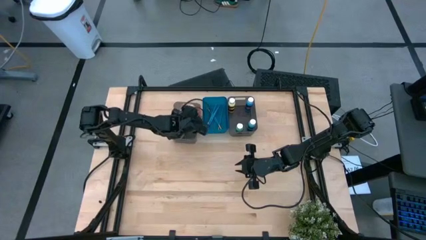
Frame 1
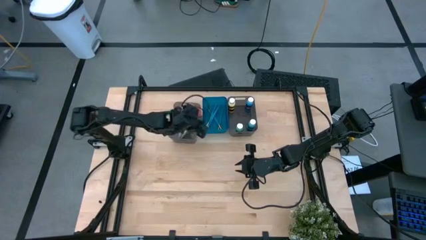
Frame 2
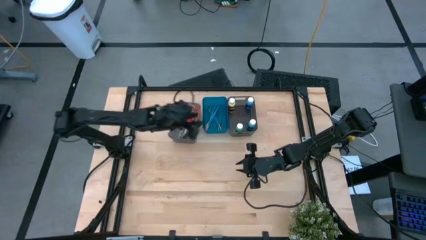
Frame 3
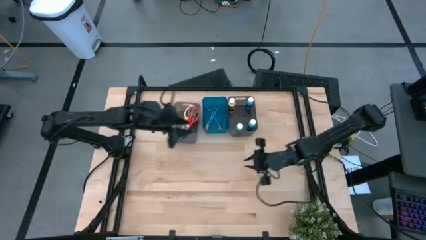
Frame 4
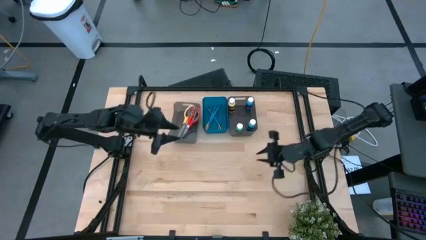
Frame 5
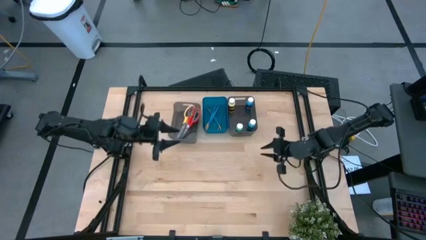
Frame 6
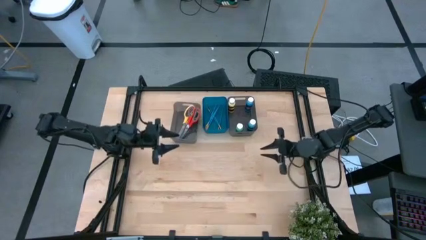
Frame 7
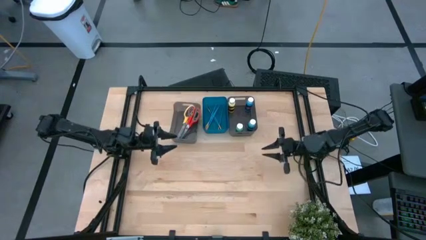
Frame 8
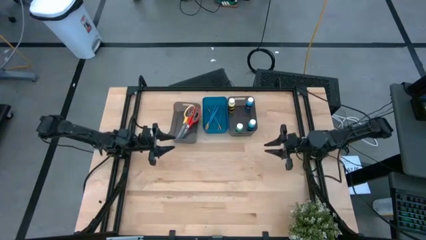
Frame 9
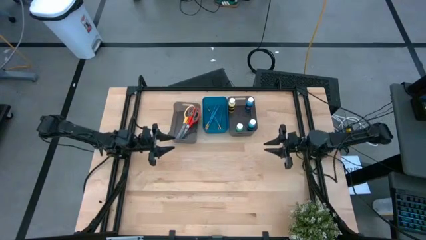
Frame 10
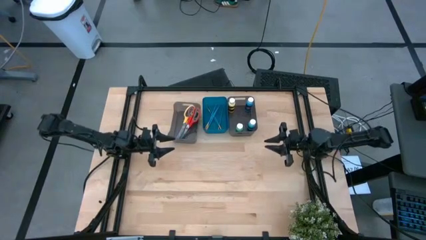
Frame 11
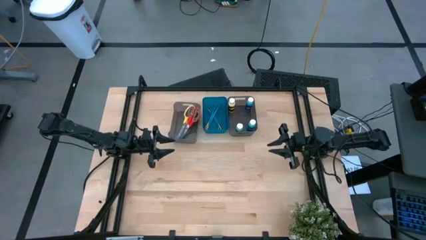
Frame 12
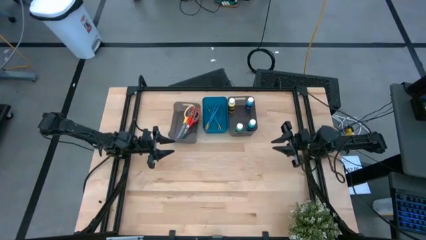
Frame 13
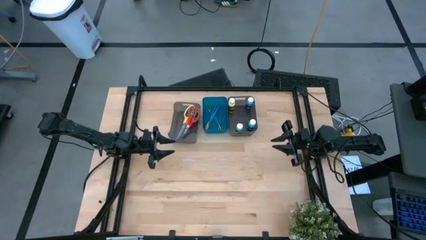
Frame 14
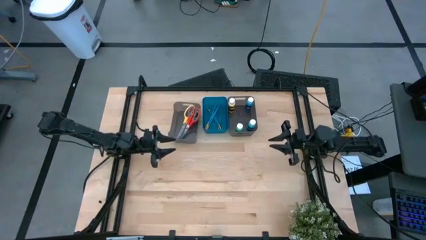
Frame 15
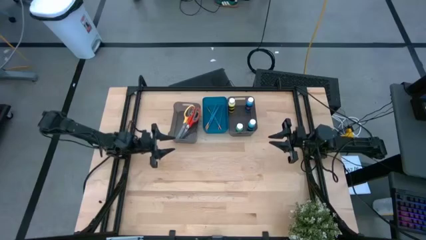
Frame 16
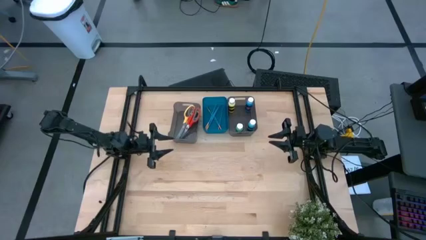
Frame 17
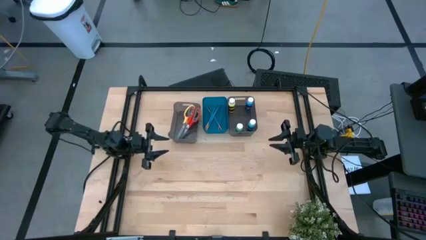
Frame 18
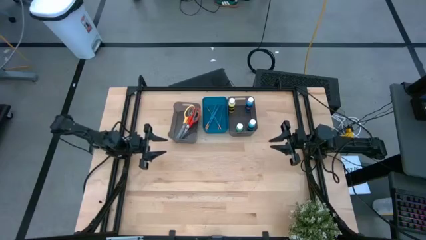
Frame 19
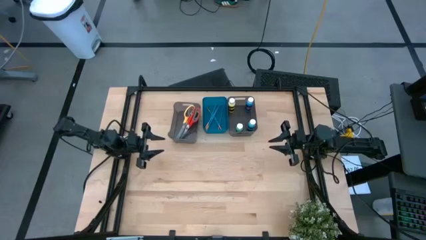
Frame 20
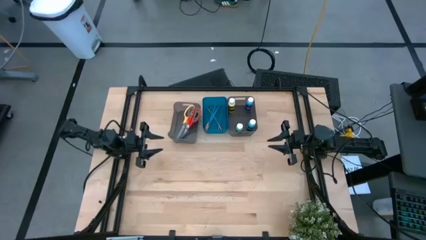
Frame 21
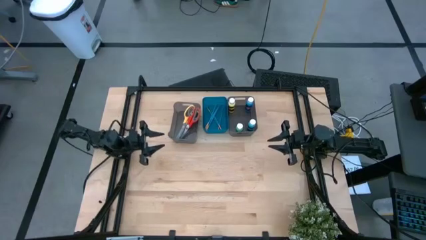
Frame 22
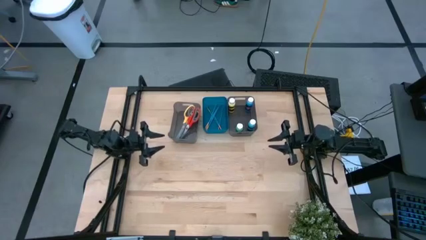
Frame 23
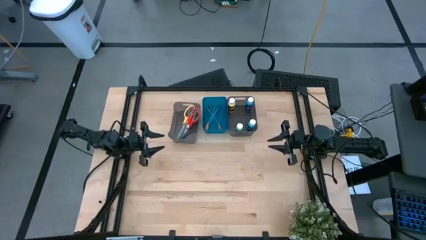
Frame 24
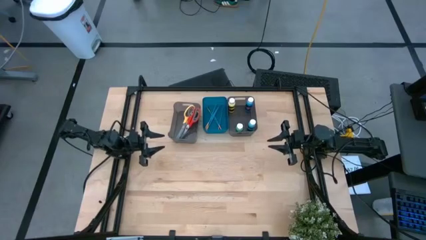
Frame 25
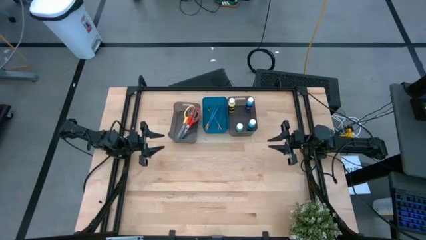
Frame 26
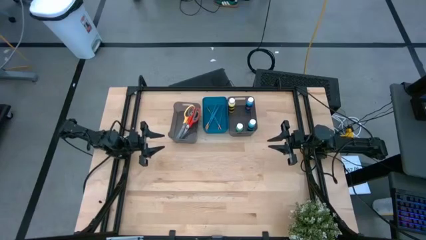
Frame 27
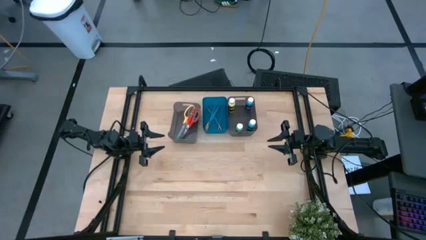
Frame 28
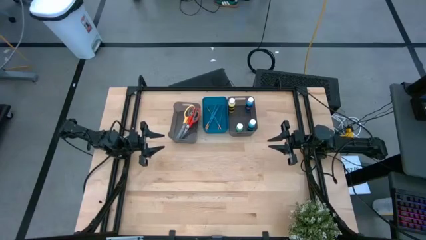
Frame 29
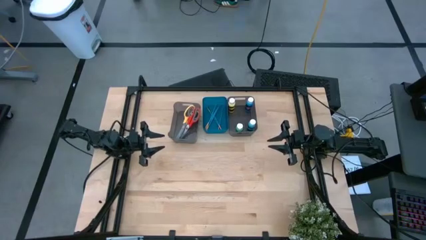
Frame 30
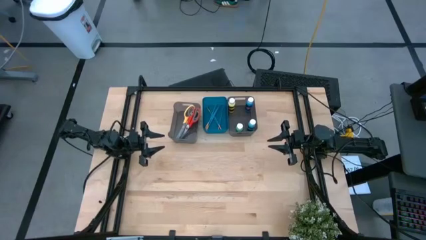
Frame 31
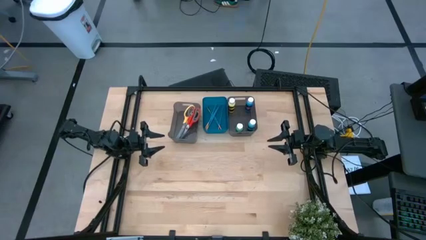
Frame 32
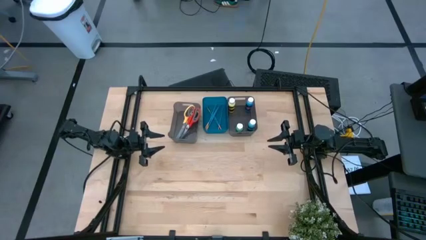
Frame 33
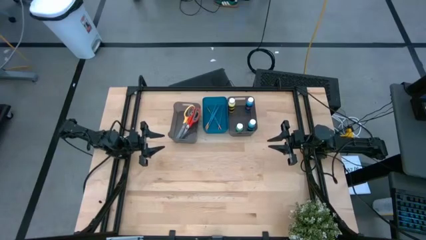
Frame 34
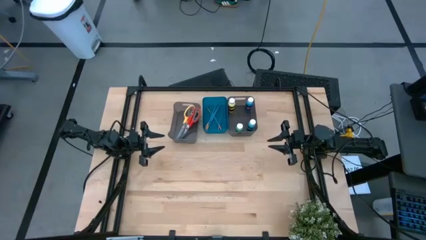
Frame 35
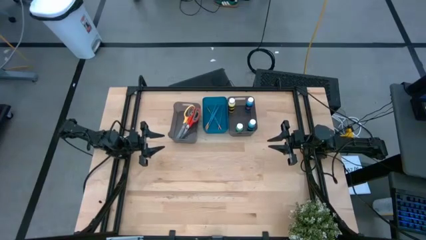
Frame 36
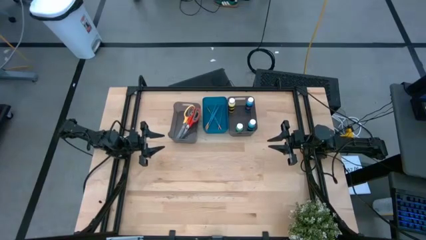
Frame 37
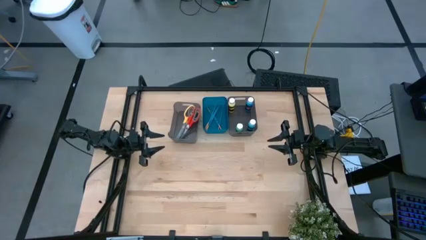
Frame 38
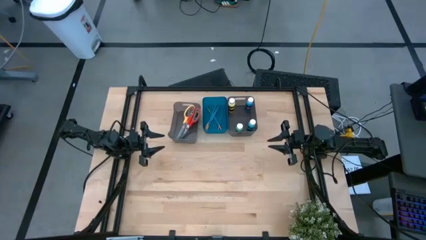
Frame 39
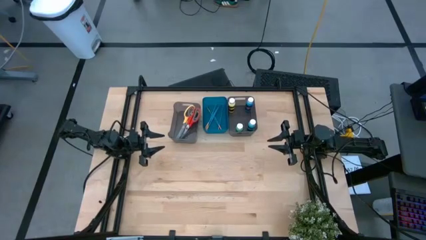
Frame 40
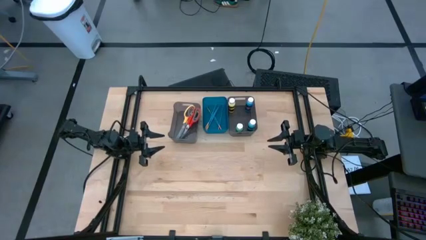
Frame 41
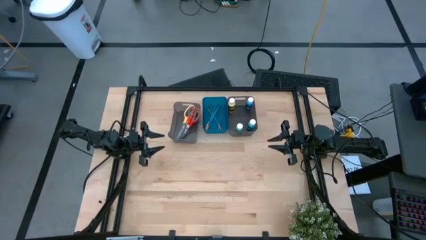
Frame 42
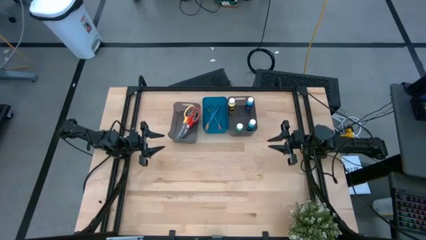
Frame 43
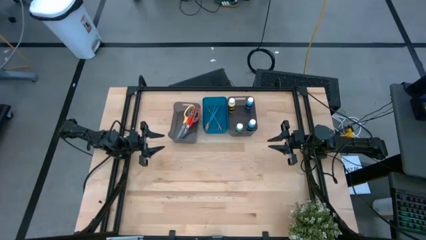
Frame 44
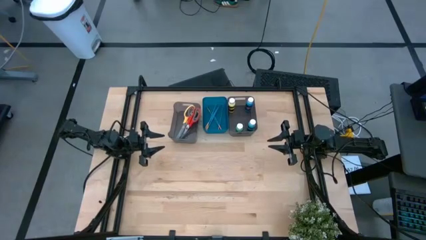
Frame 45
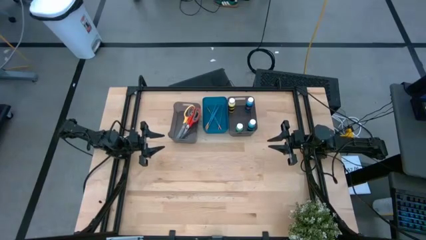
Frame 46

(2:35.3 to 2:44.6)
Task: Pick & Place Paint Supplies
Return to Home Position

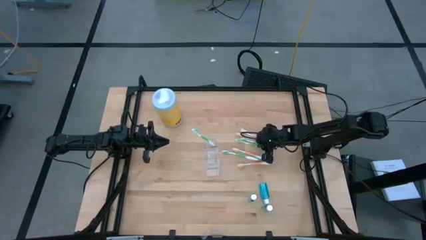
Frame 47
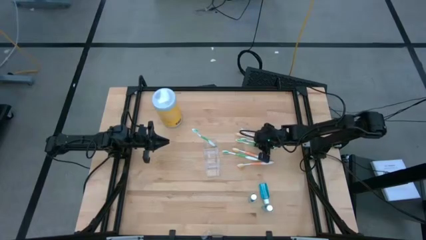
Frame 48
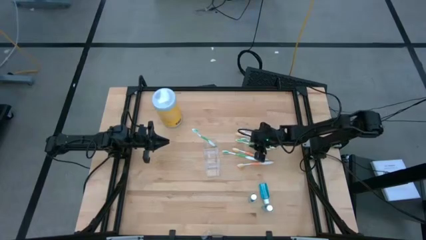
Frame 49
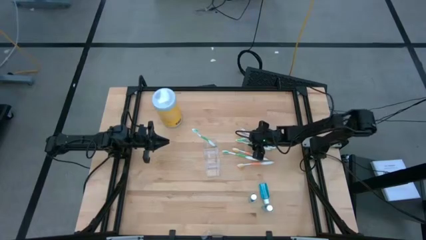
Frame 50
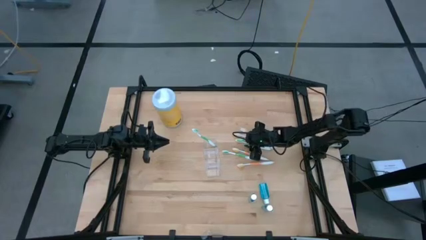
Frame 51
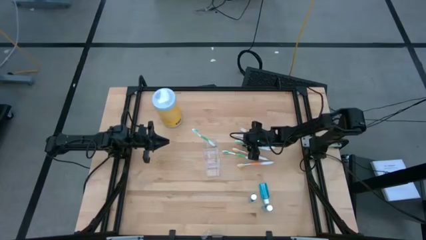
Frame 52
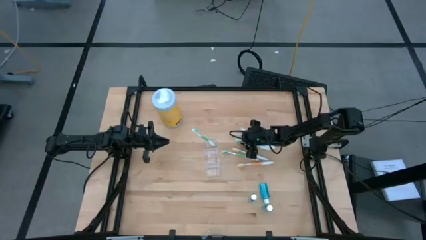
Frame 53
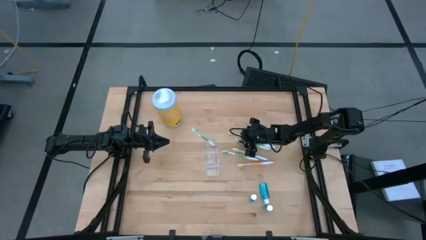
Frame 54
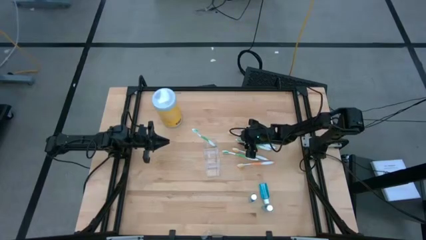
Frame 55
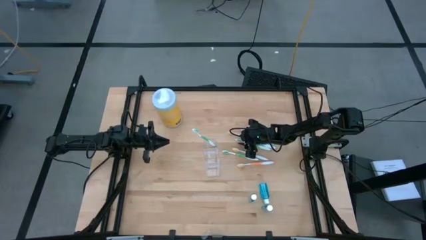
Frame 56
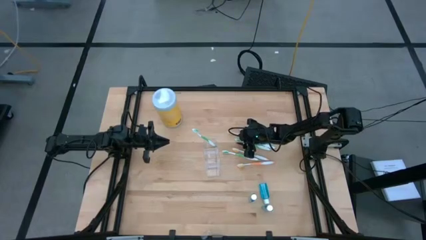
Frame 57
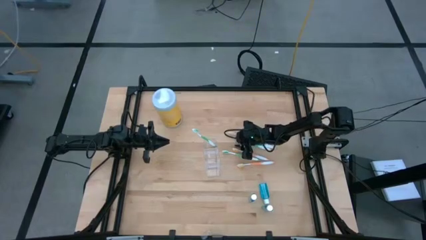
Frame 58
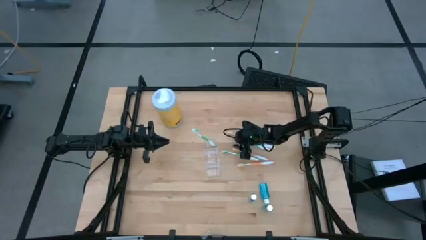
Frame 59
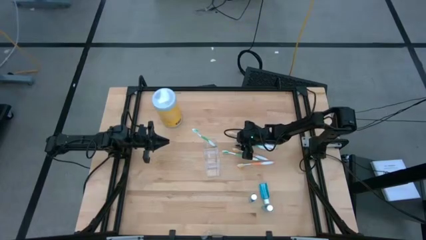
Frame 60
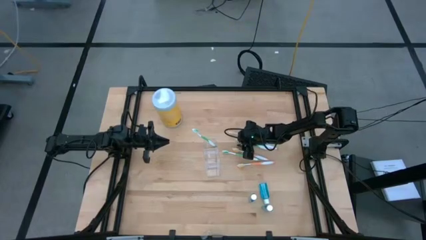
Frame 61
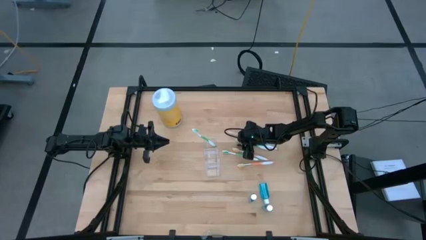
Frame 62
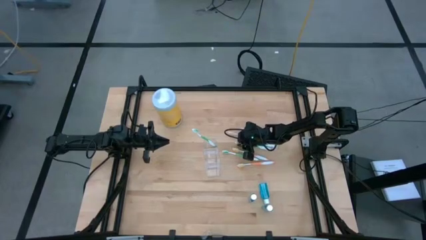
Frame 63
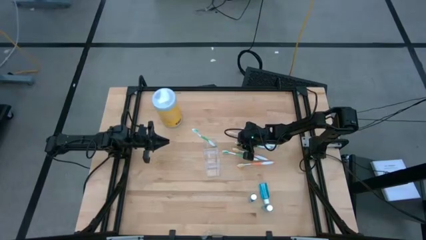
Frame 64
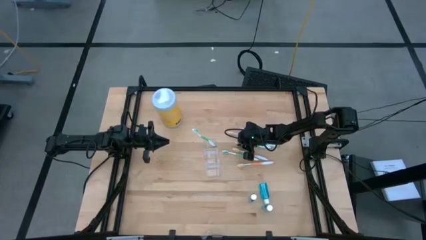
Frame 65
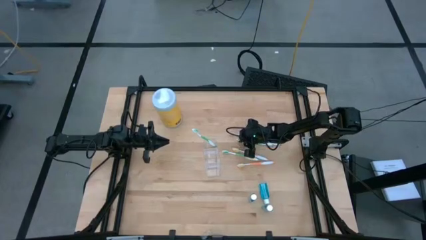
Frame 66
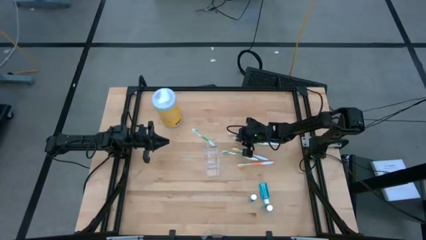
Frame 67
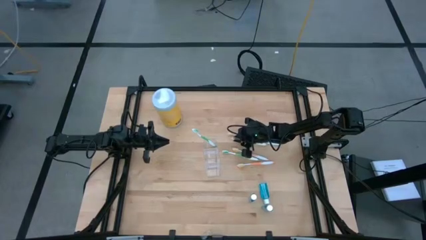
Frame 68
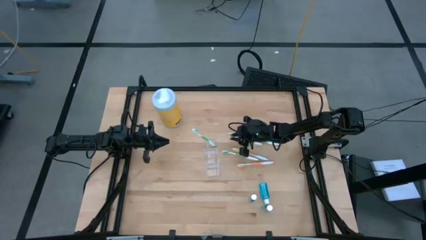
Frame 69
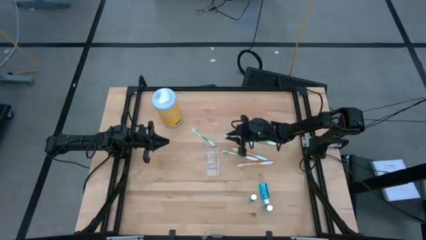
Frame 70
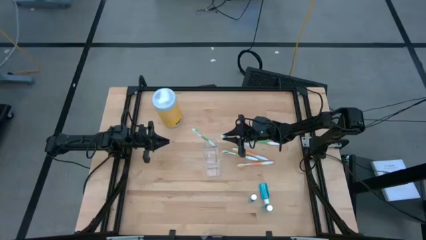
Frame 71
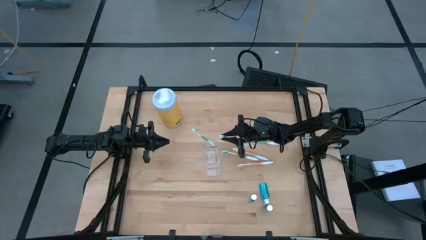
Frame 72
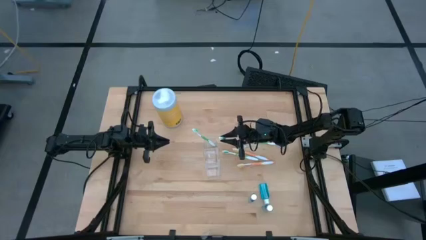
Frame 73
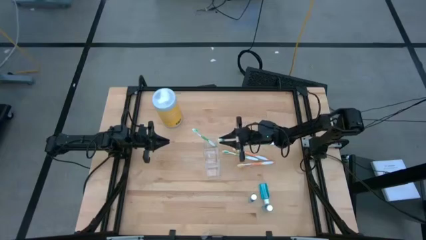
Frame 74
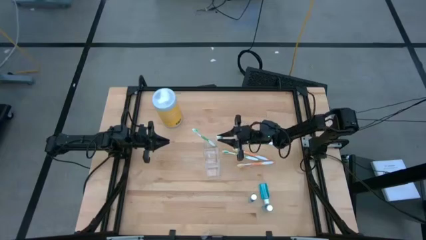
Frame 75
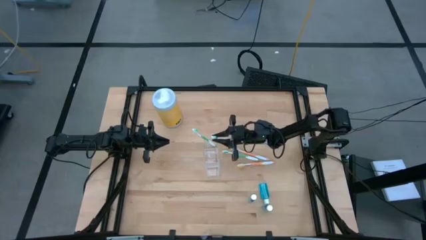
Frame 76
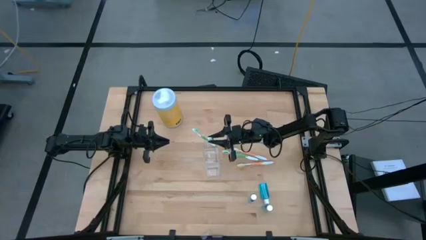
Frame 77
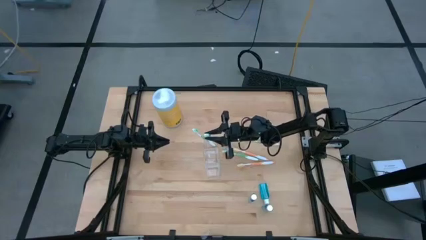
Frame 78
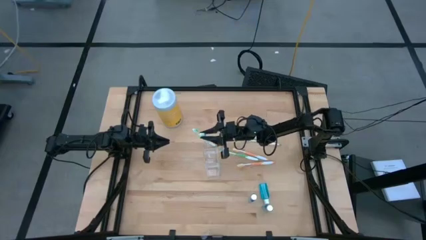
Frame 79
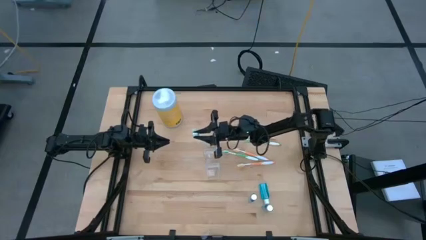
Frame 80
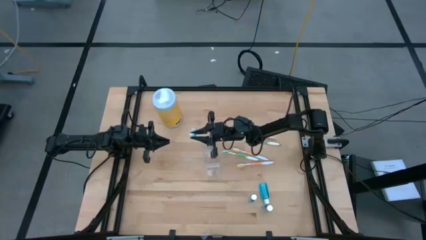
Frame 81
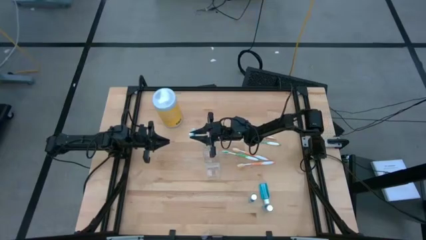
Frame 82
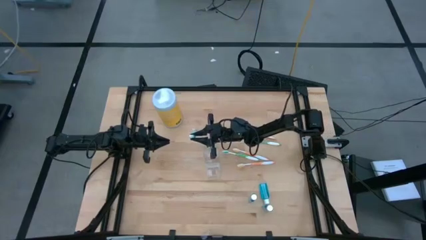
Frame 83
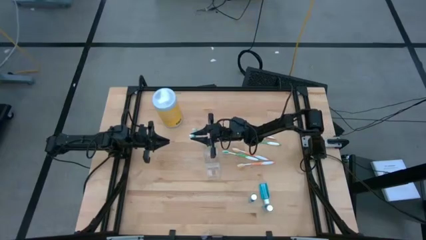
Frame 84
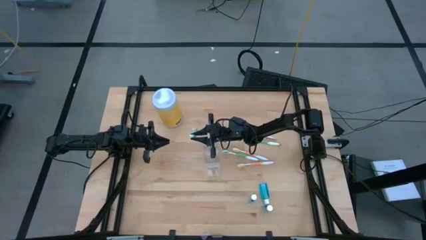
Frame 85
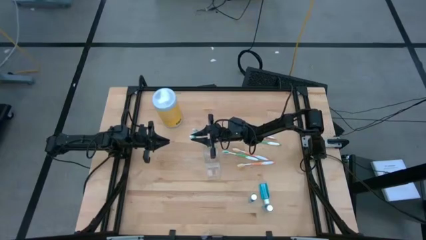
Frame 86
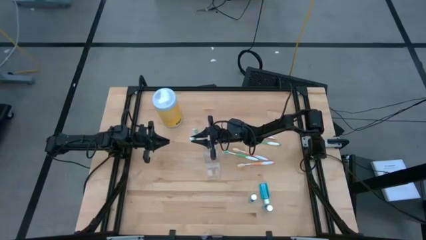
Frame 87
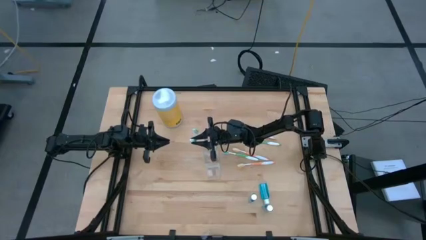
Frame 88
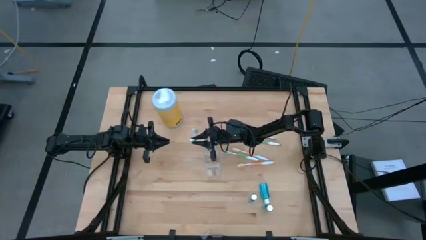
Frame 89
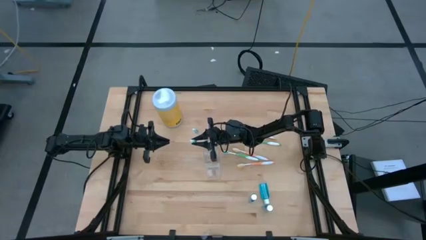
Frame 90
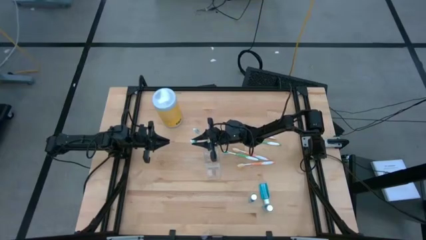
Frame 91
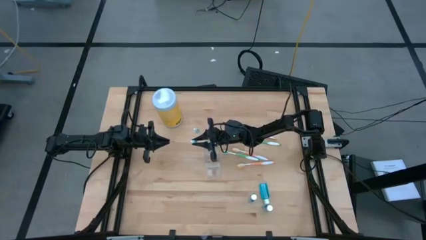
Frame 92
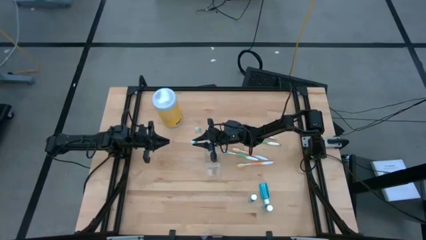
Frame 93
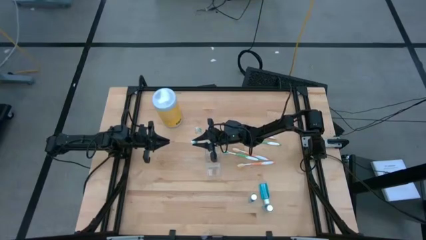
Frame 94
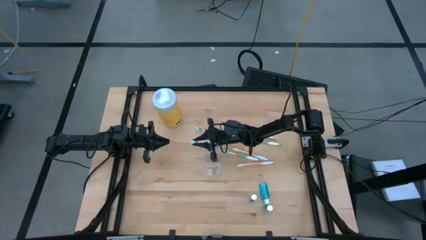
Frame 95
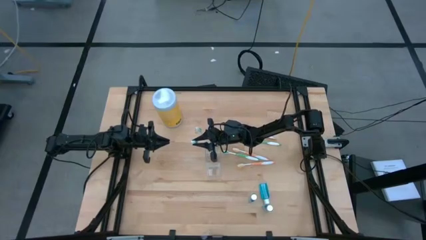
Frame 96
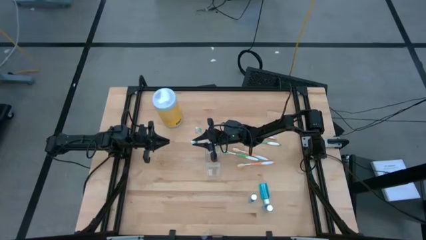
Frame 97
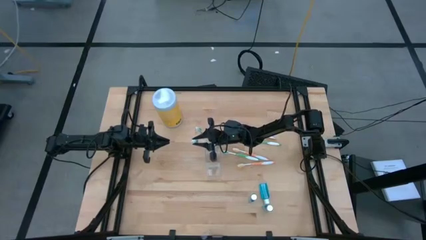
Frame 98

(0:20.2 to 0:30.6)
Task: Pick & Place toothbrushing station
Put the green toothbrush into the transparent organizer
